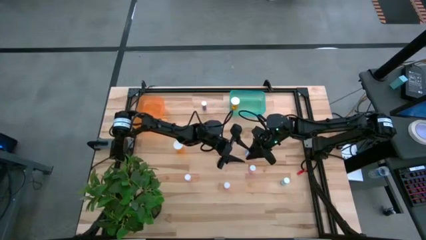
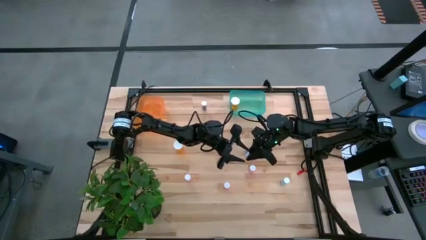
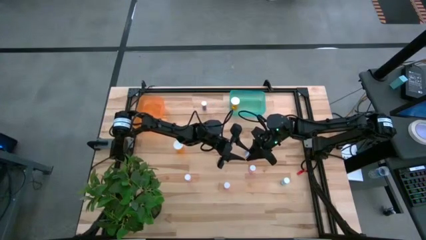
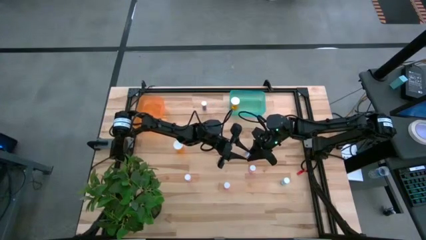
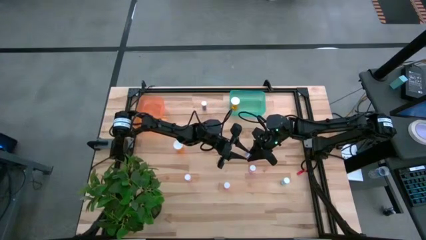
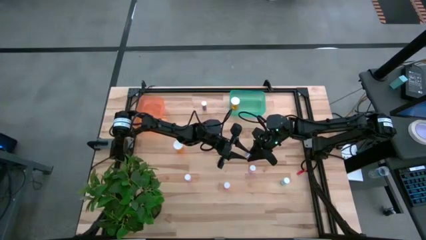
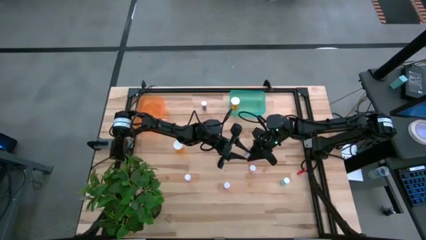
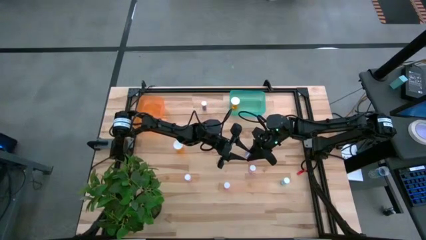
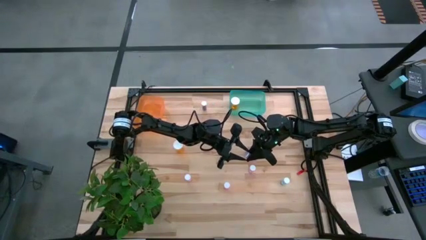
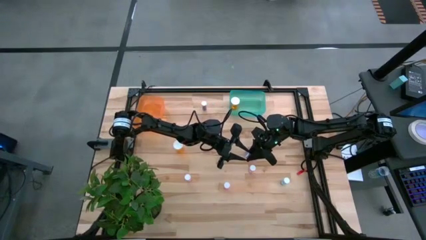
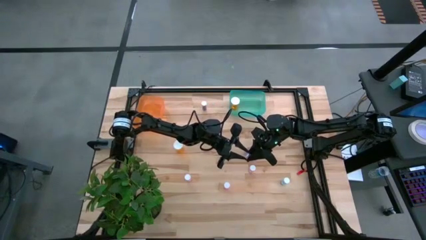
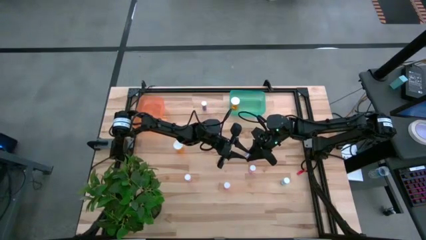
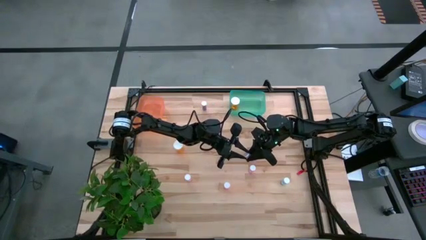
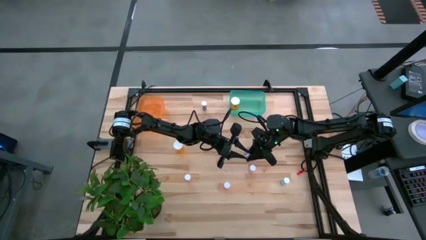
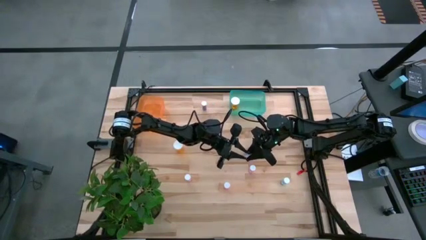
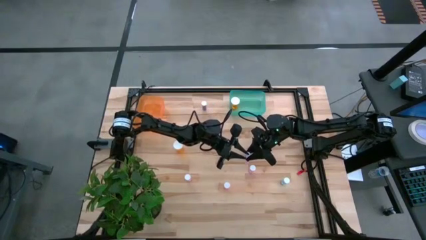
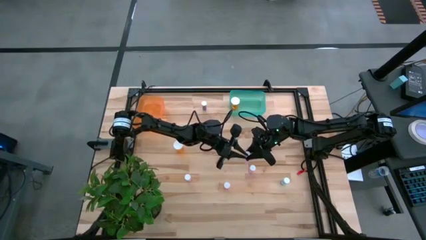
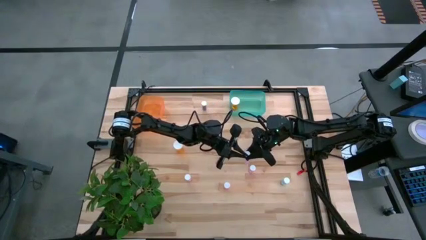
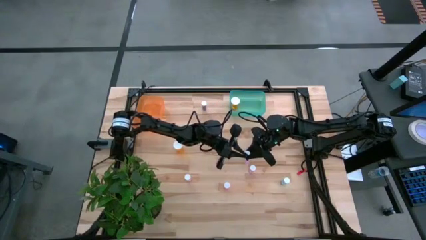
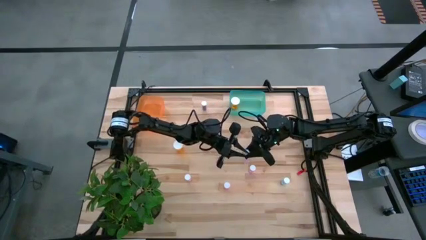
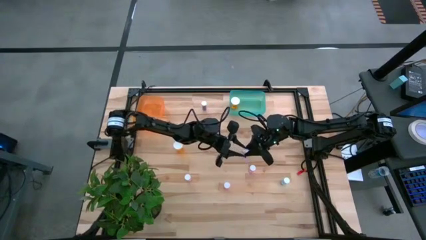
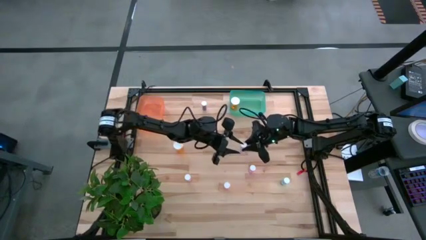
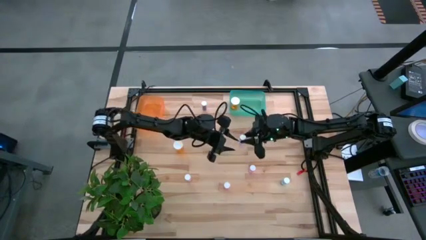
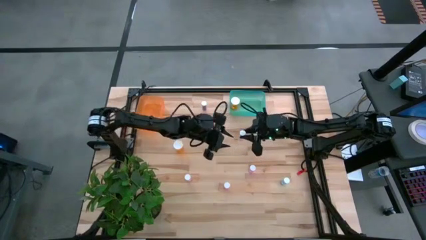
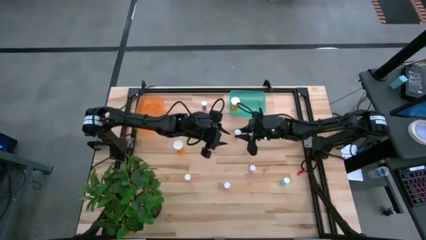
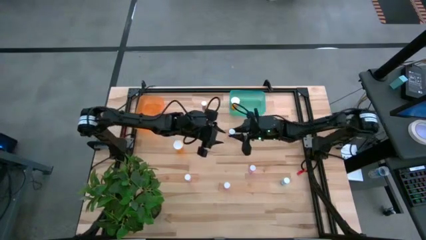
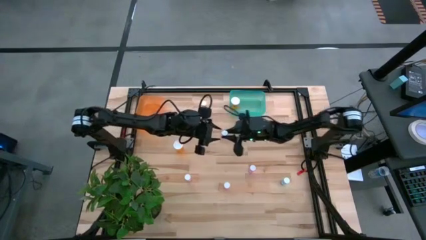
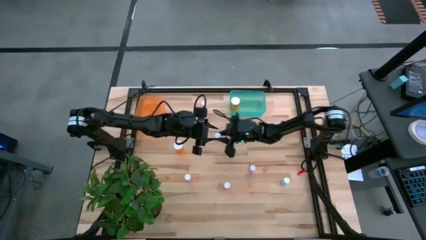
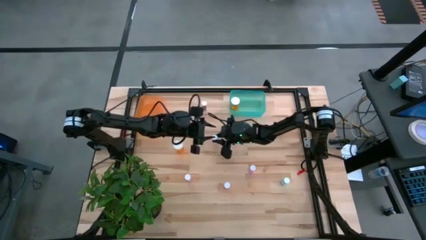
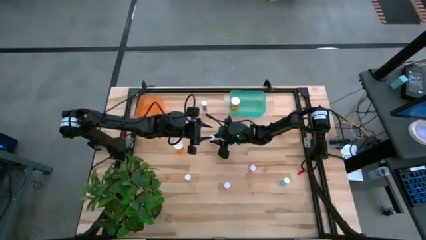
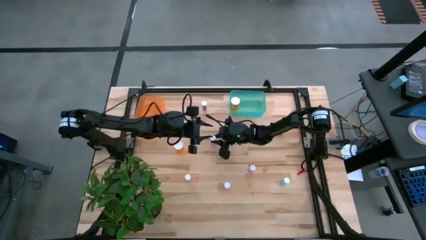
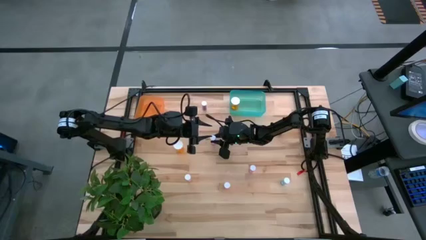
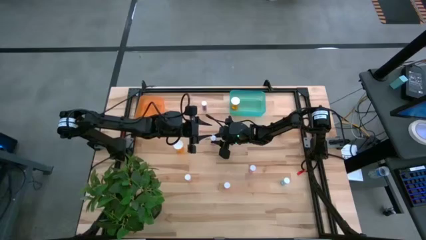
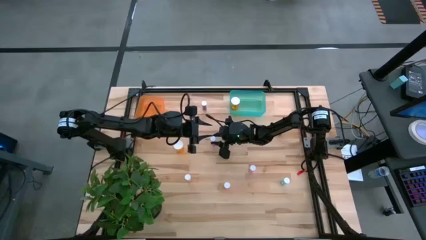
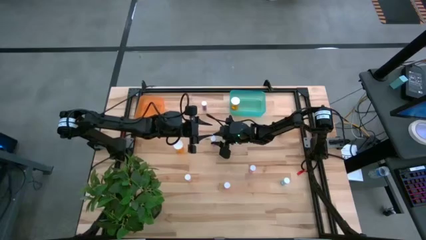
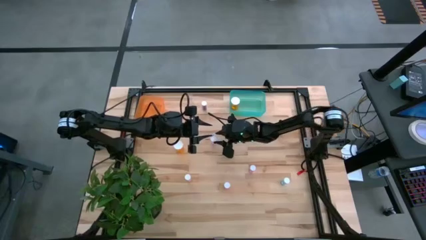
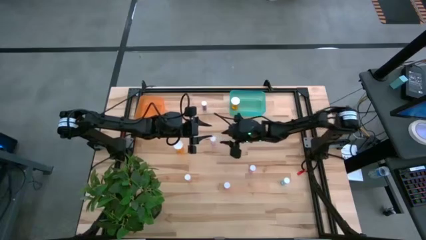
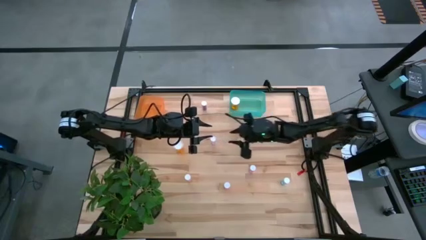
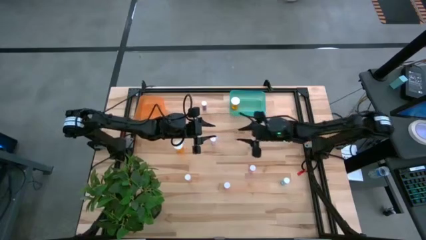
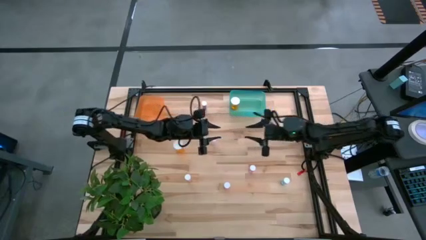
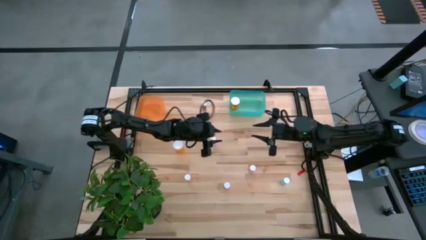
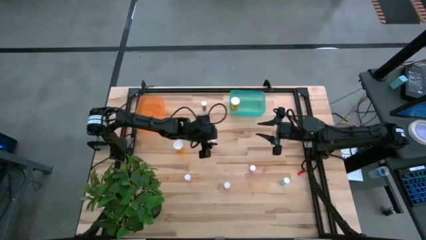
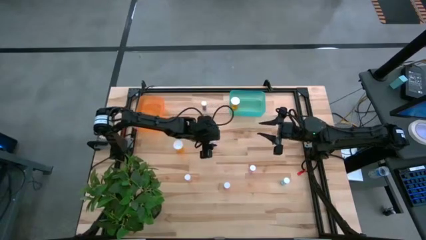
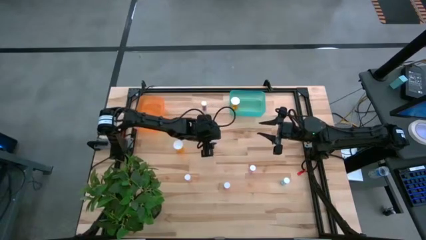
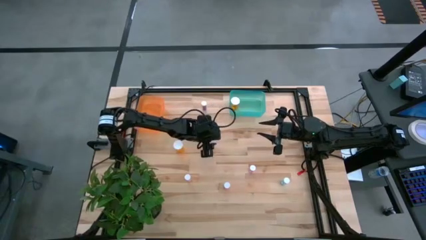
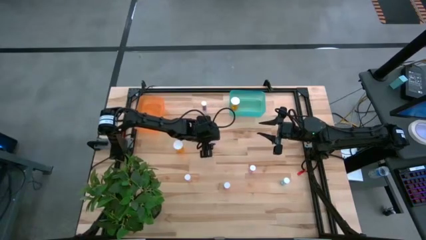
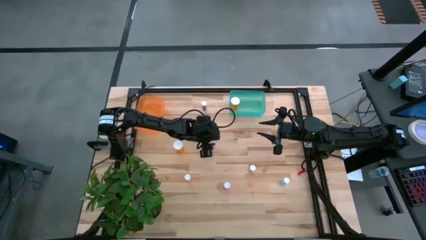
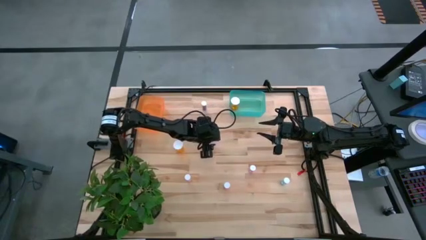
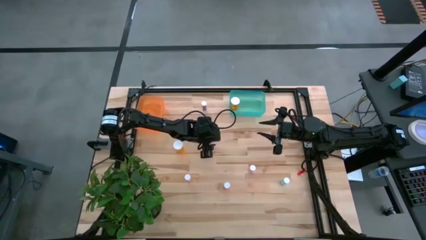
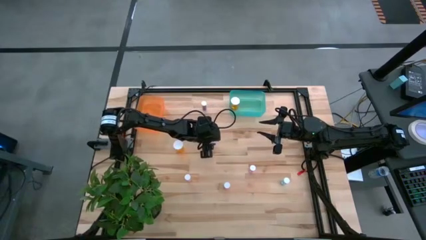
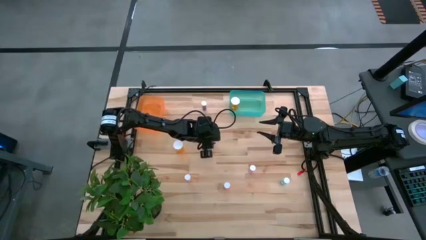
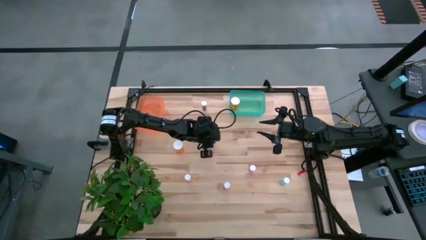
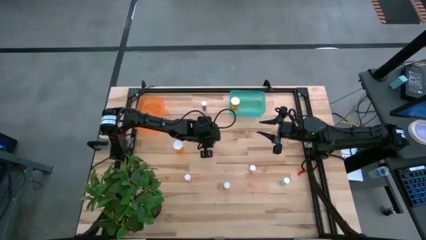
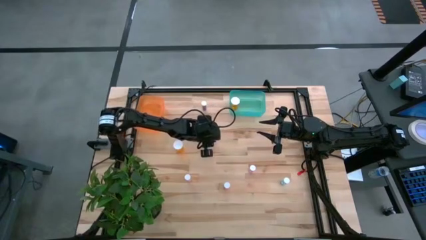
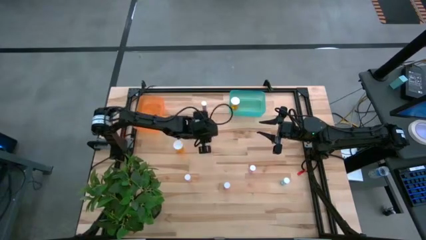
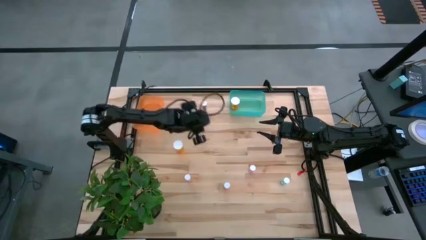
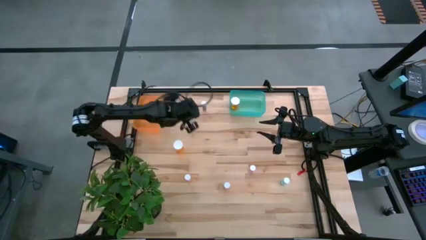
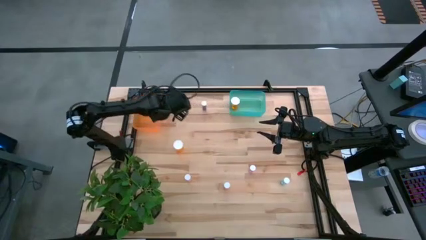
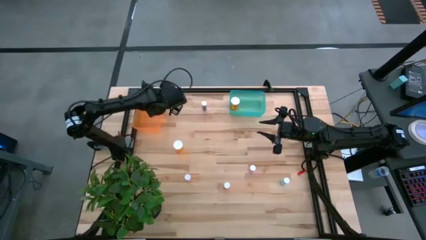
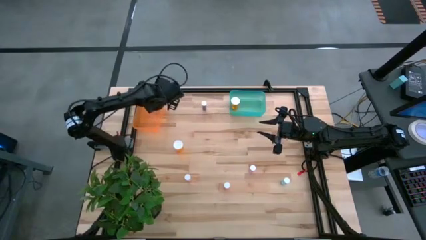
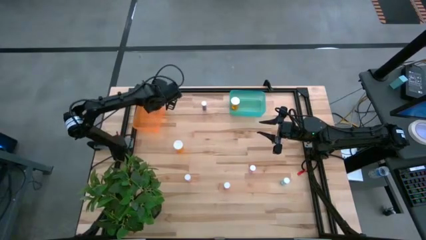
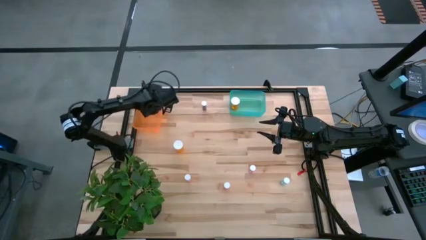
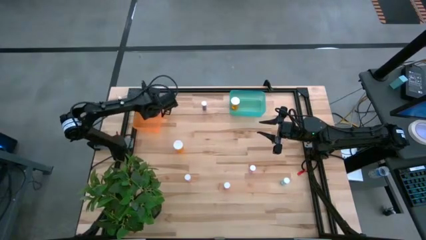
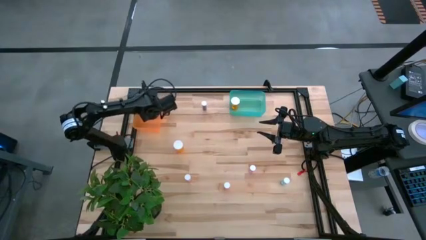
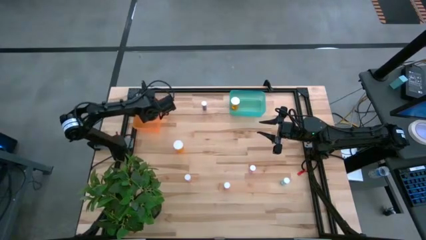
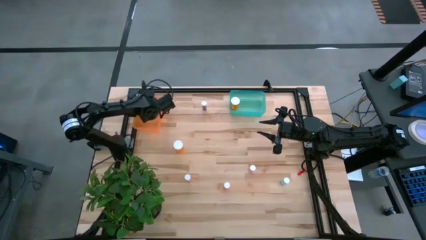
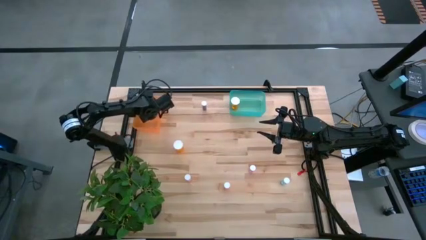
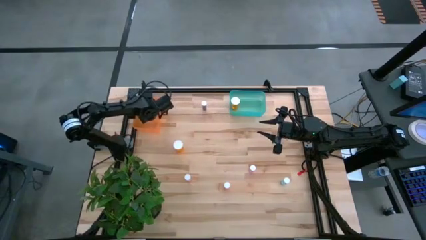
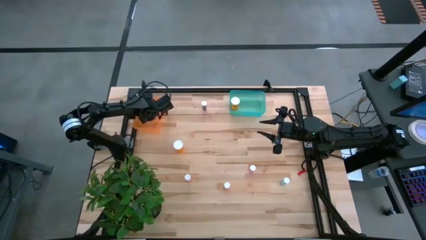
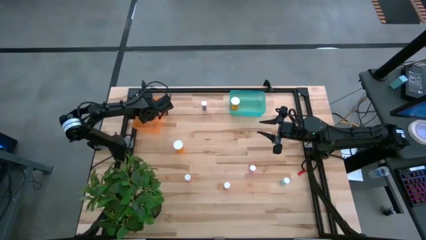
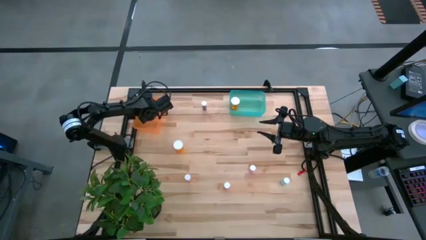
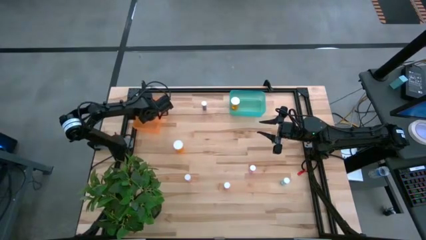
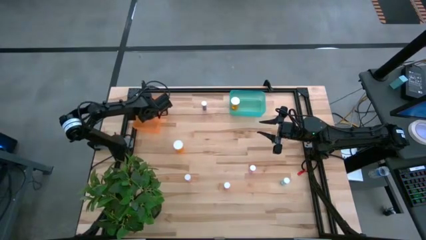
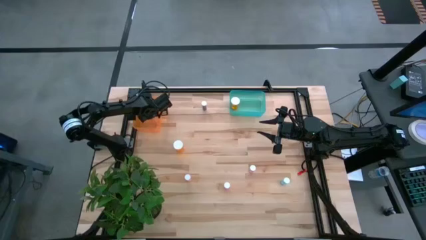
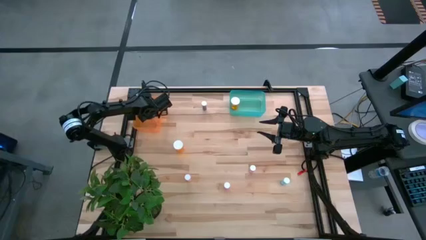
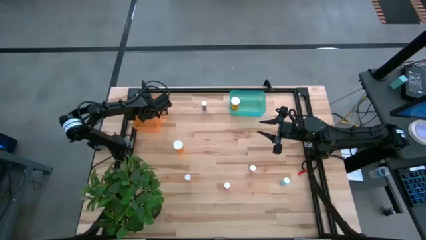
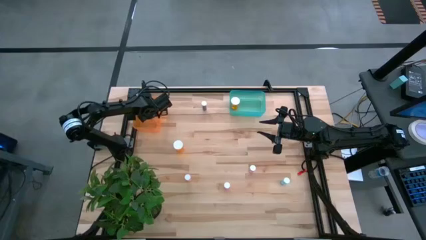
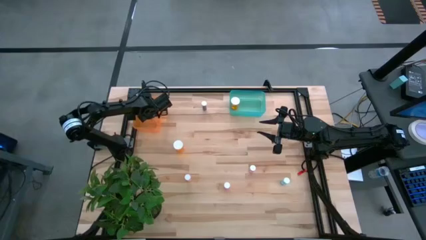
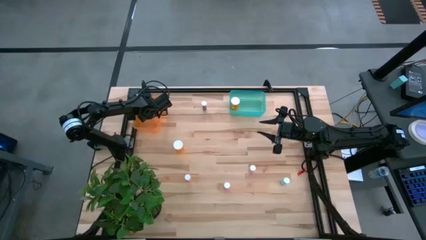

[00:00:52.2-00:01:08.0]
Task: Pick and place medicine bottles into bin by pill shape (circle, oval)
Put the pink tablet bottle into the orange bin
